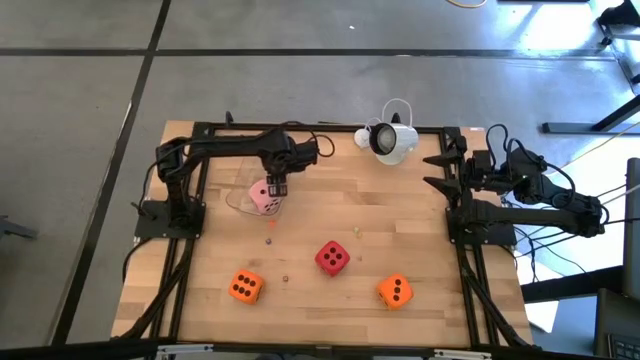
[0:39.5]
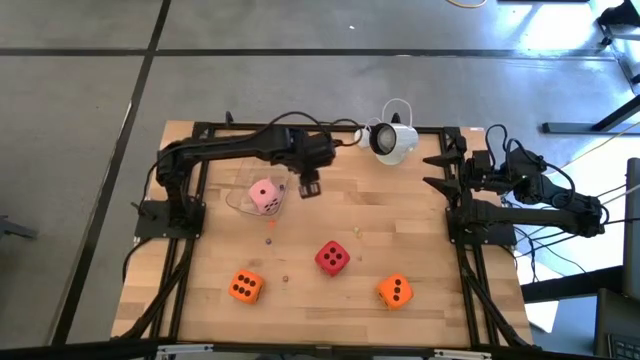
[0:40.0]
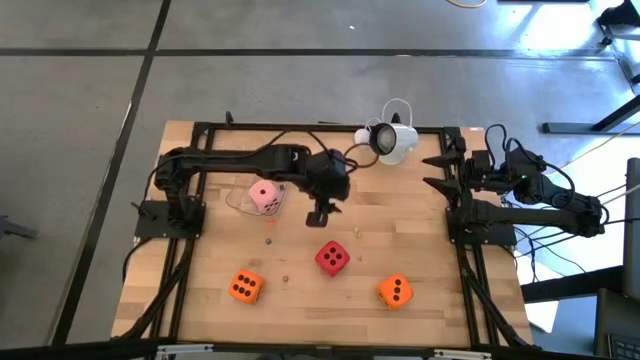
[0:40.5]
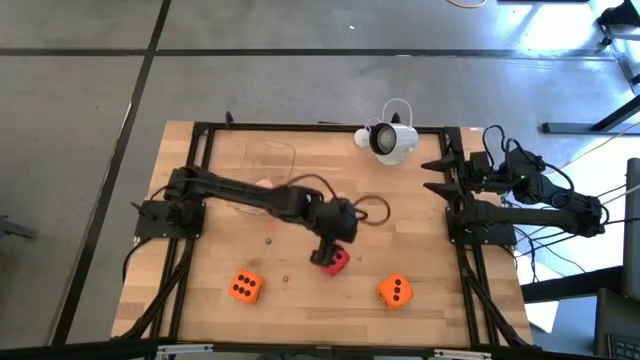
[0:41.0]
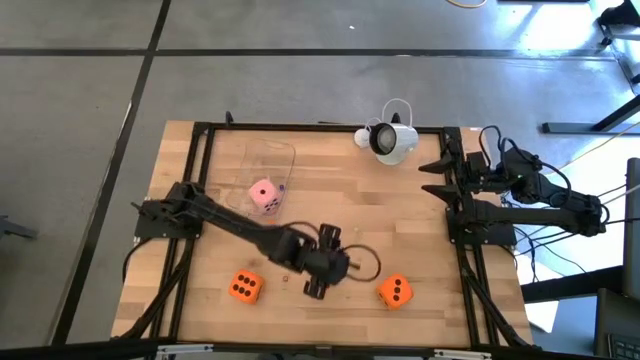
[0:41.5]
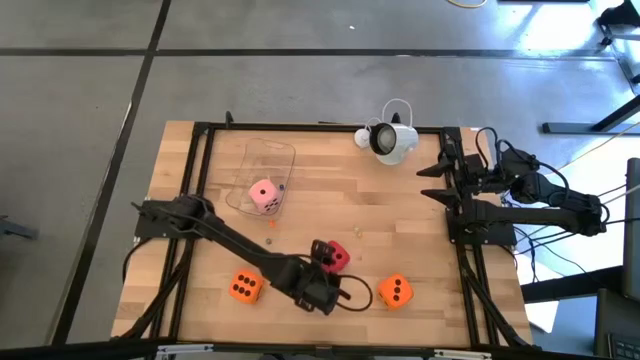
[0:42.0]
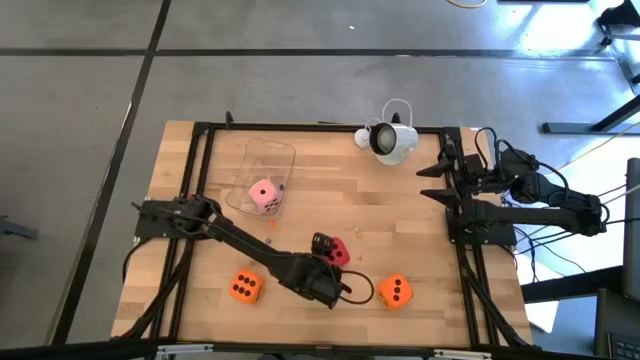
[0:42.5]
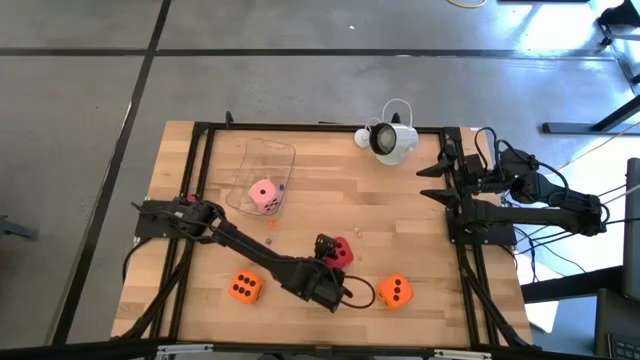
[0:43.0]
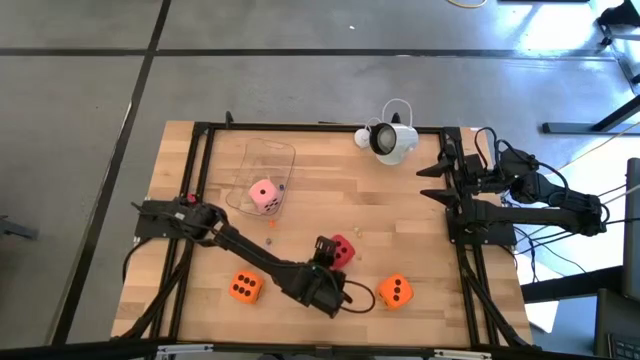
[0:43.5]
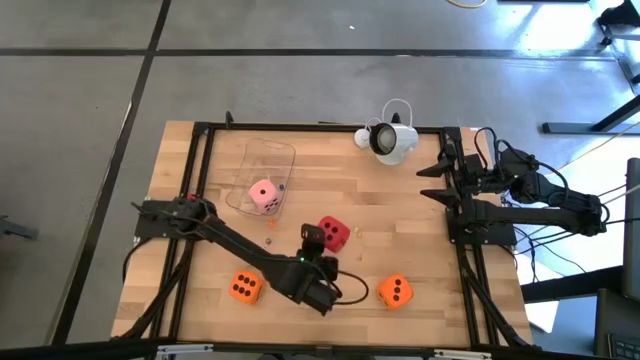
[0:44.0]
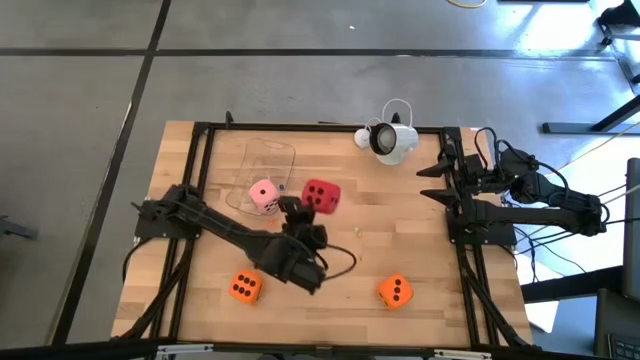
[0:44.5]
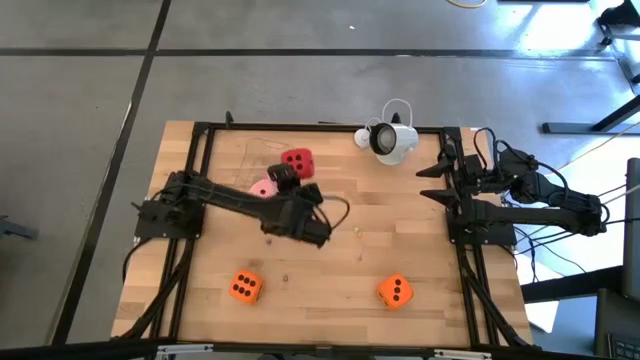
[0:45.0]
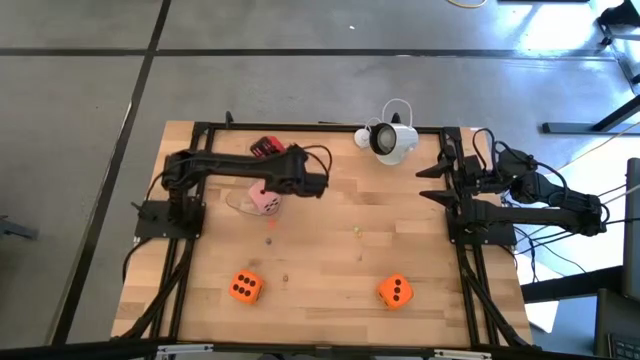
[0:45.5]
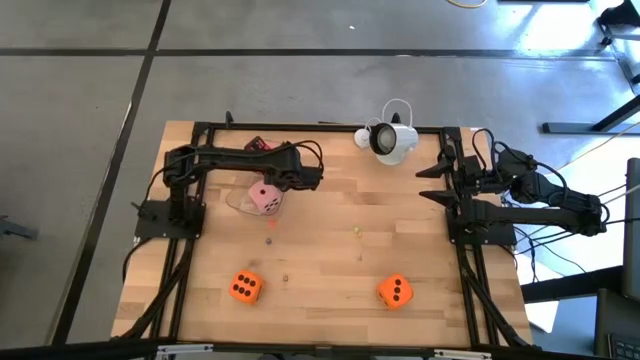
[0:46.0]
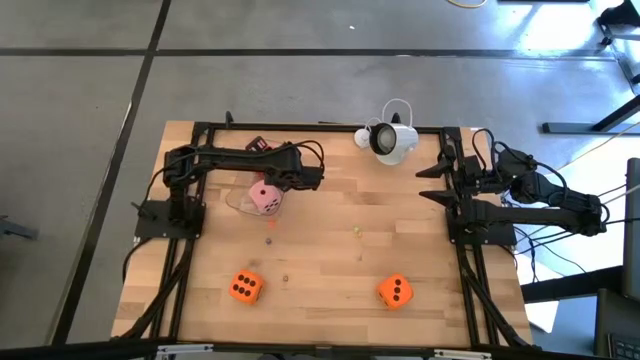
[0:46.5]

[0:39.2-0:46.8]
Task: Pick & Place Dice
Put the large red die into the transparent bin

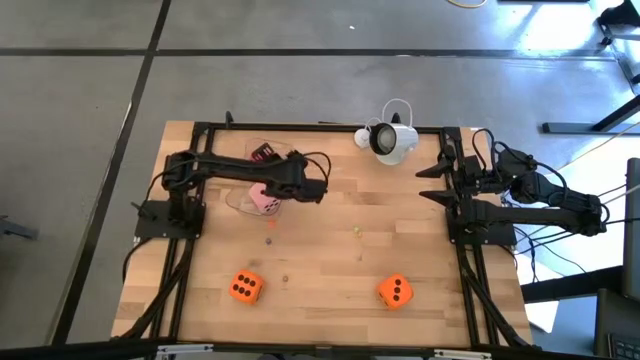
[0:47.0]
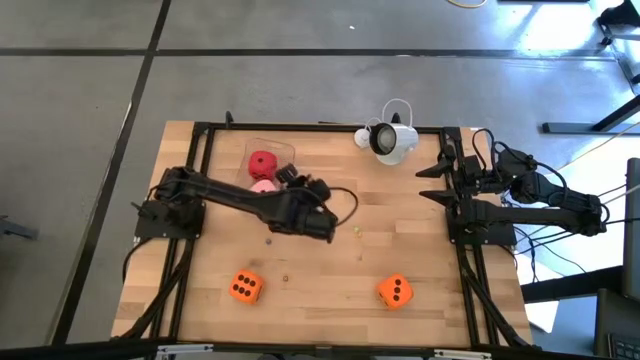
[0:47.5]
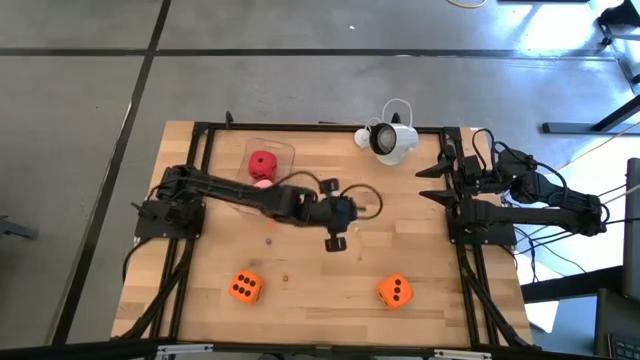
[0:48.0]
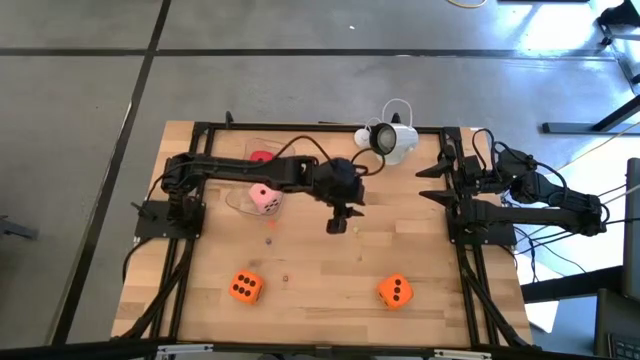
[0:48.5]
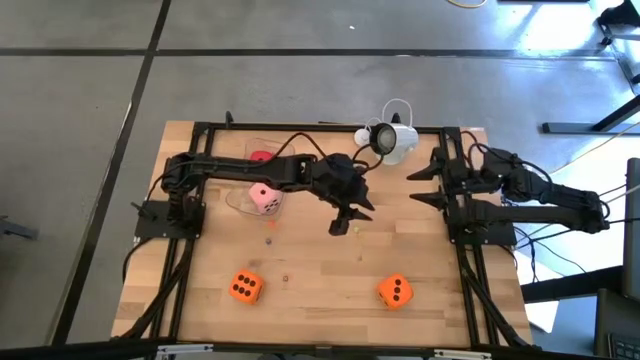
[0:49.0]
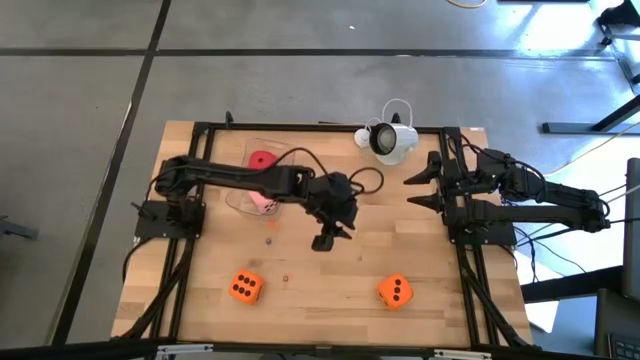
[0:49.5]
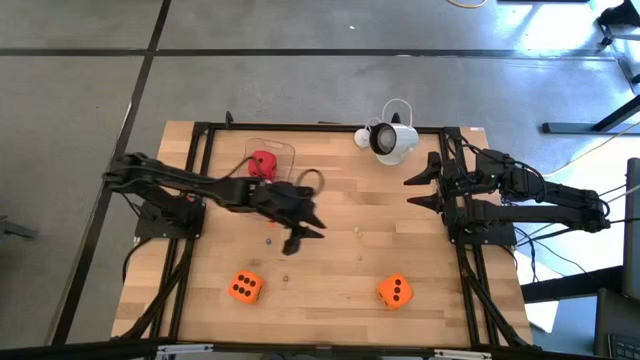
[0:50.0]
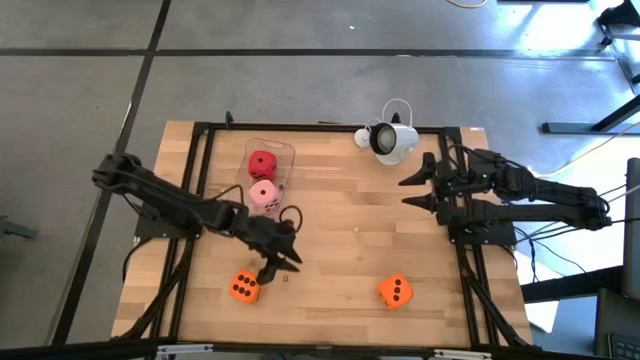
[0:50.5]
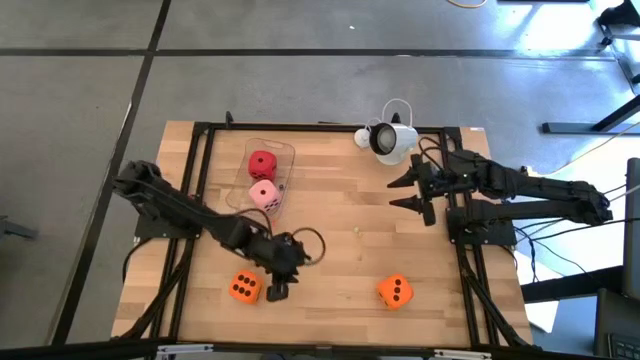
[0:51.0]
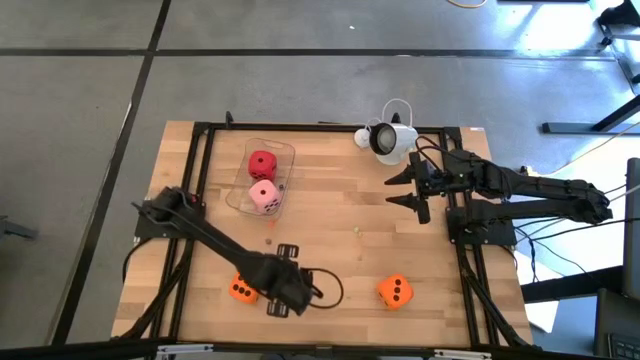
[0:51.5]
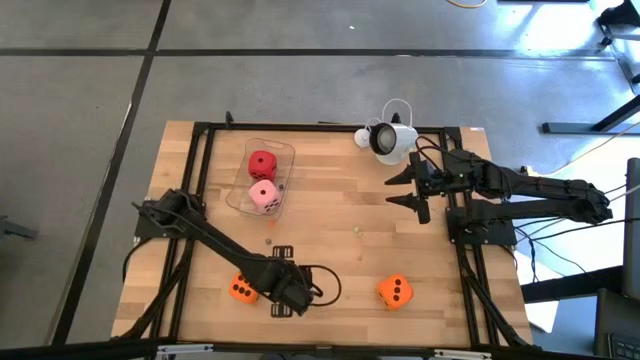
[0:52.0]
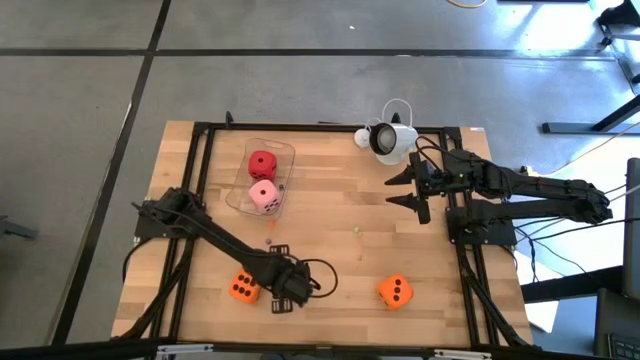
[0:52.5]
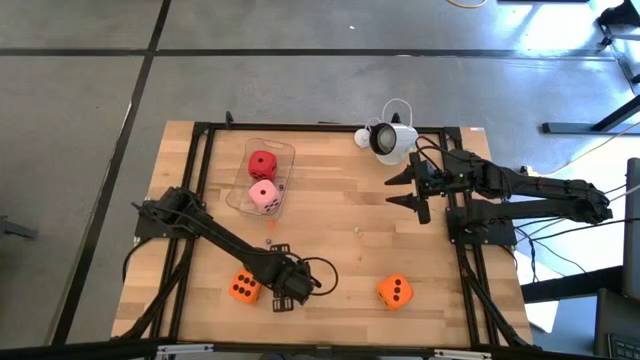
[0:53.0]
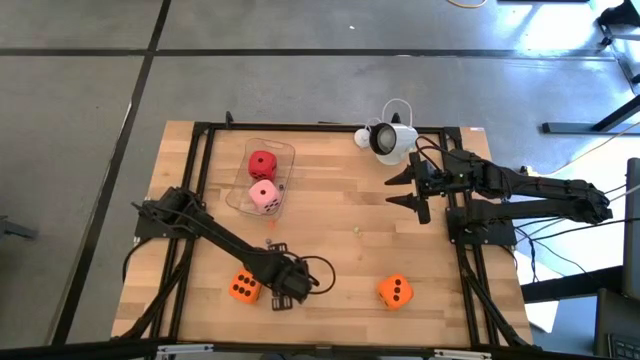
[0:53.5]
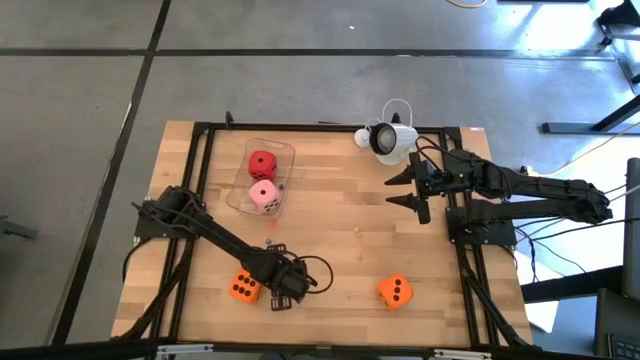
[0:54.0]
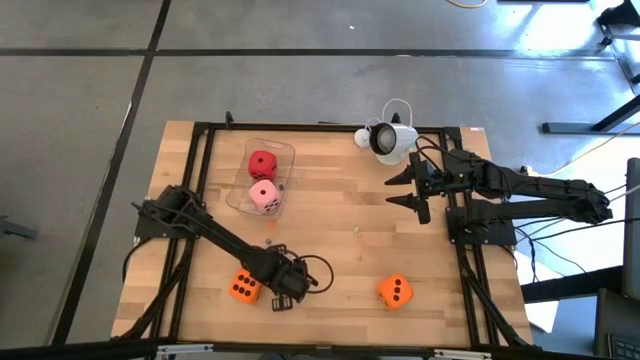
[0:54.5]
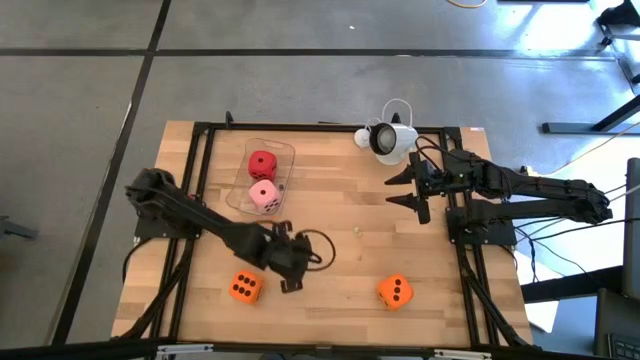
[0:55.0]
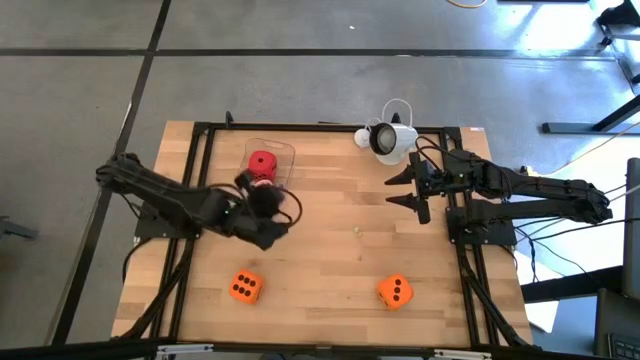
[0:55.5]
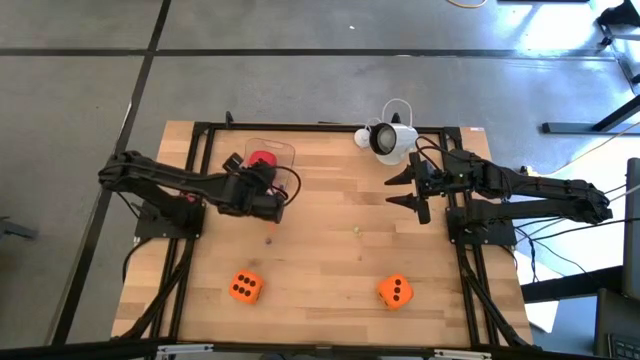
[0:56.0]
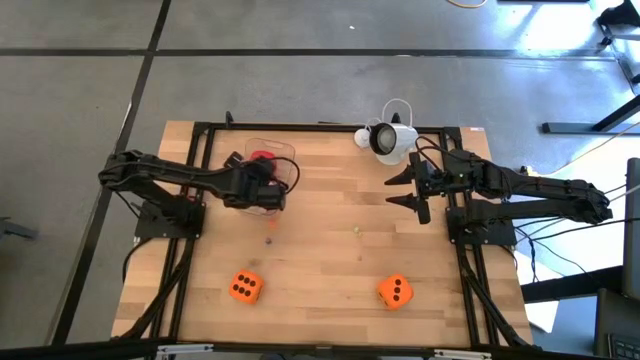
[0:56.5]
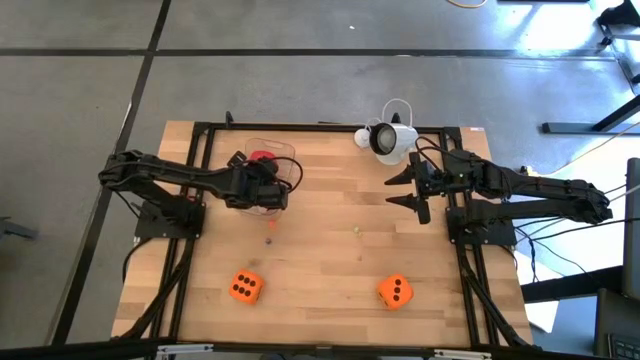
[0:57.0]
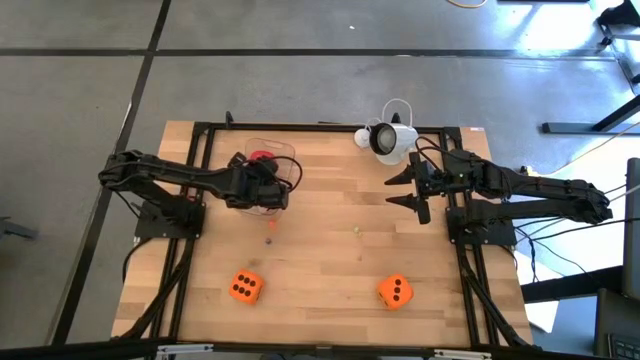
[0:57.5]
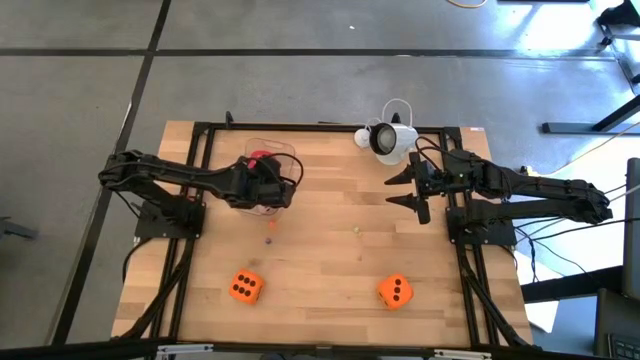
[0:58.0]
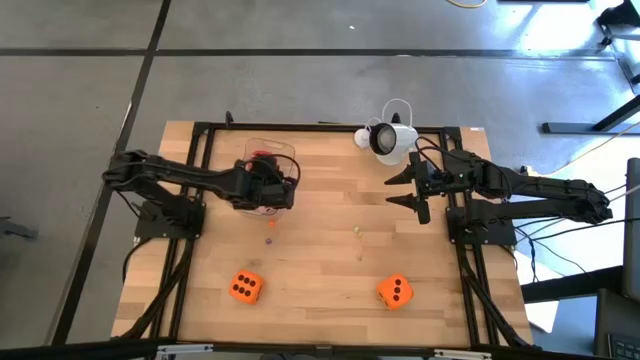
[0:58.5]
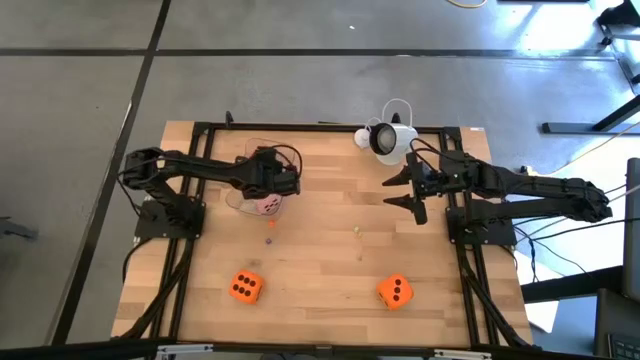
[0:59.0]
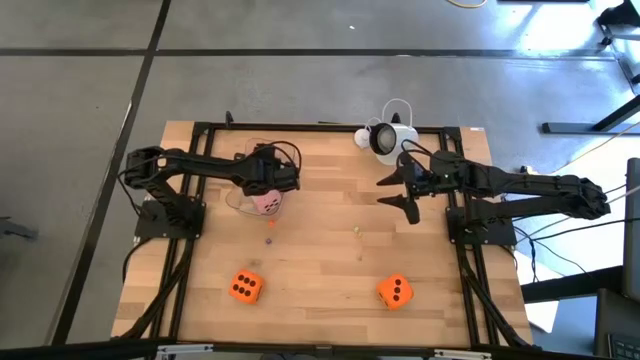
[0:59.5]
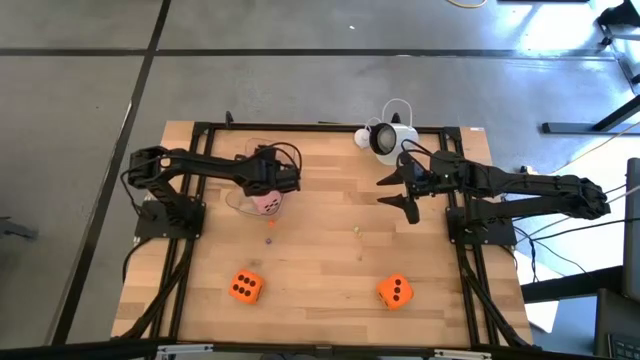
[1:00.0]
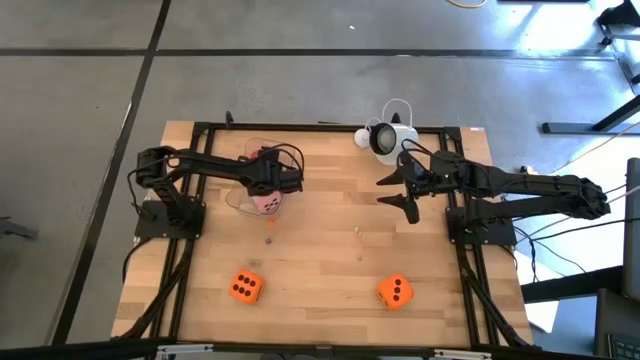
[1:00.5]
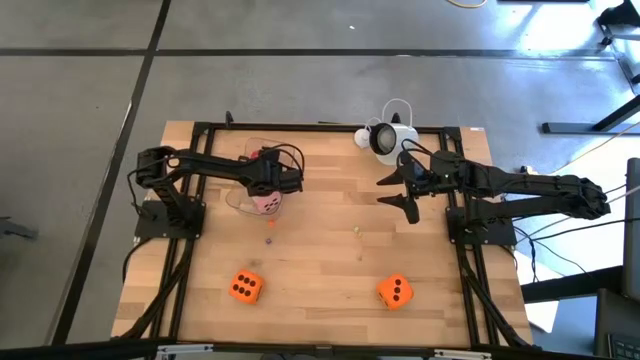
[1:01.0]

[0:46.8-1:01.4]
Put the small red die into the transparent bin
